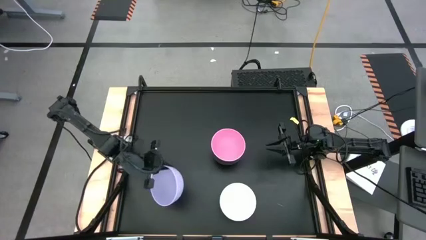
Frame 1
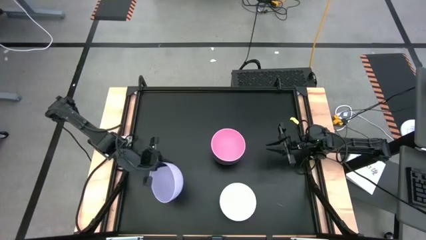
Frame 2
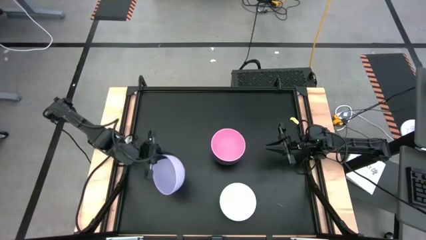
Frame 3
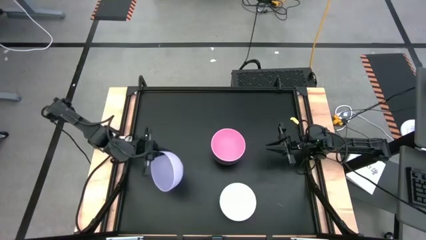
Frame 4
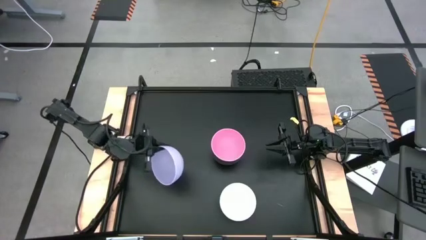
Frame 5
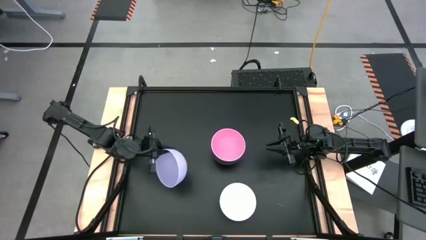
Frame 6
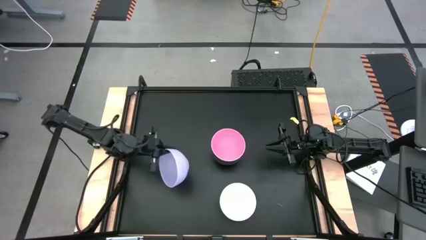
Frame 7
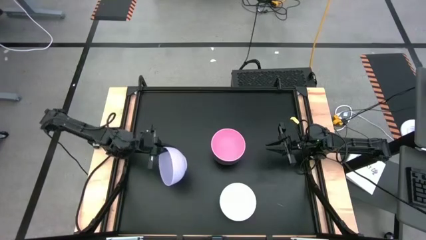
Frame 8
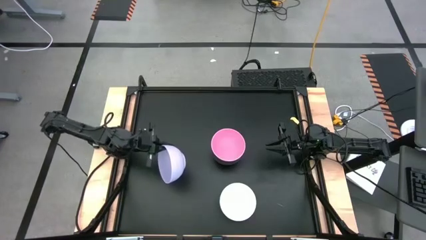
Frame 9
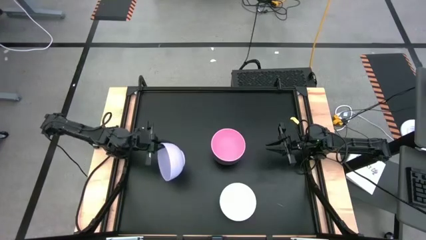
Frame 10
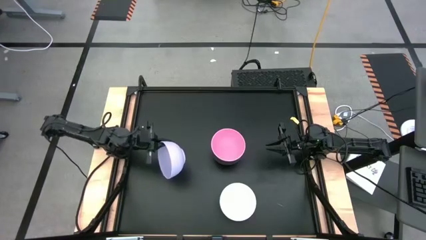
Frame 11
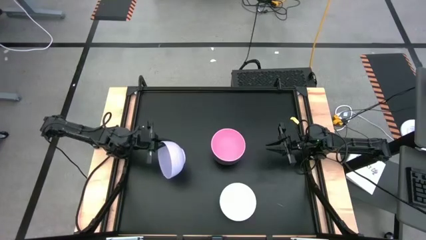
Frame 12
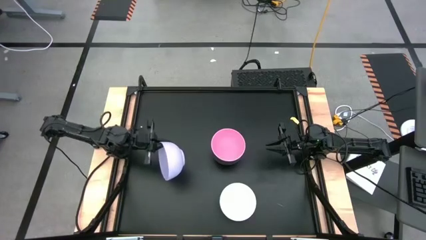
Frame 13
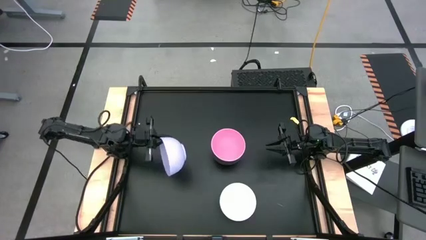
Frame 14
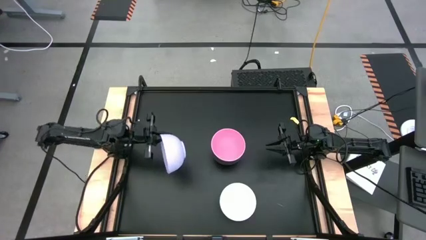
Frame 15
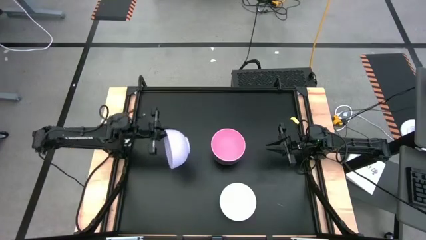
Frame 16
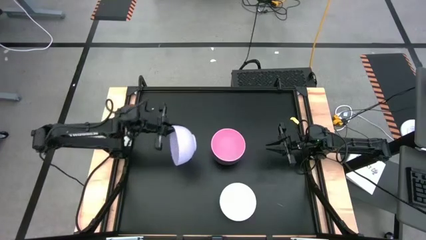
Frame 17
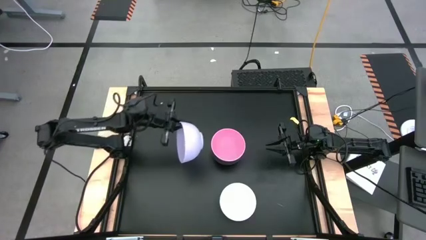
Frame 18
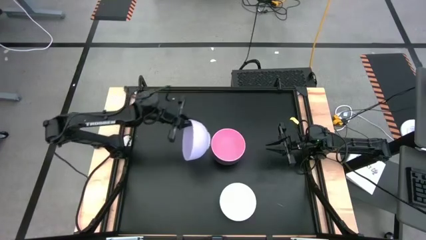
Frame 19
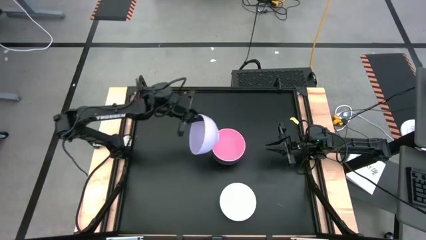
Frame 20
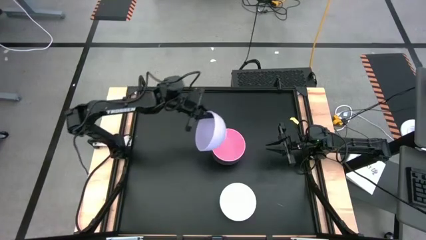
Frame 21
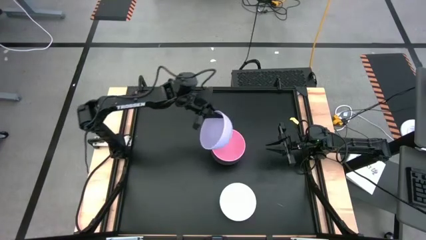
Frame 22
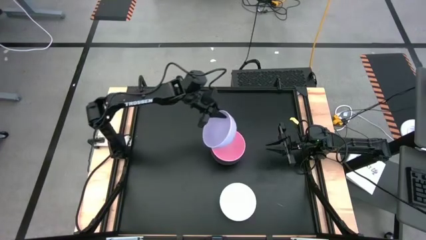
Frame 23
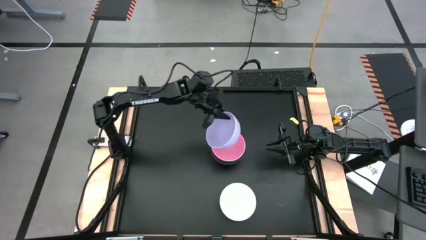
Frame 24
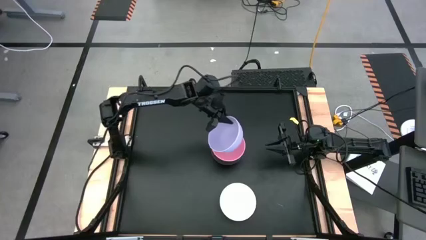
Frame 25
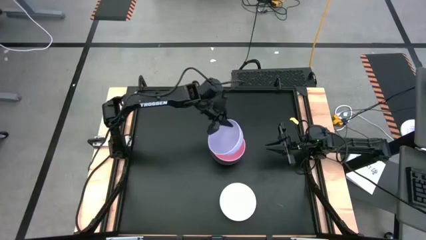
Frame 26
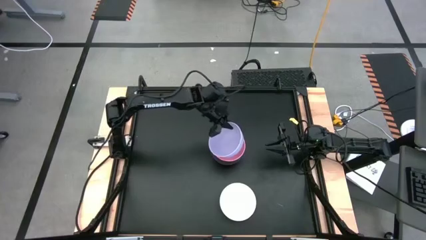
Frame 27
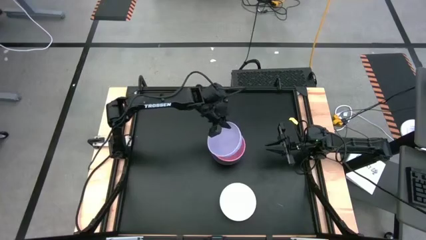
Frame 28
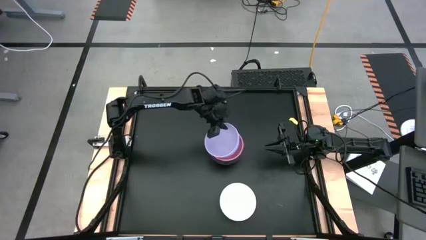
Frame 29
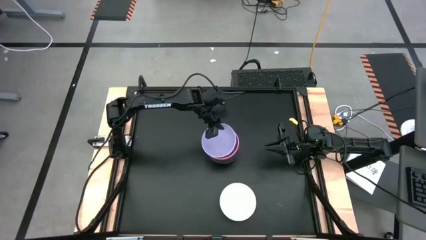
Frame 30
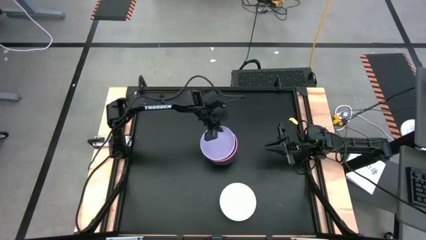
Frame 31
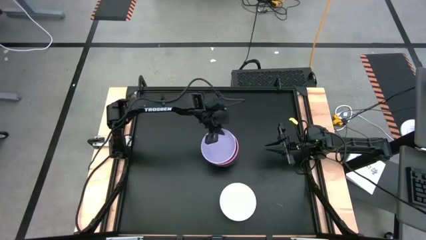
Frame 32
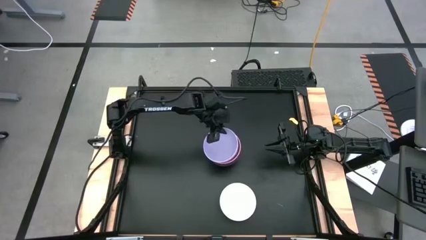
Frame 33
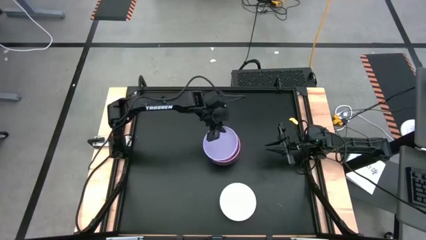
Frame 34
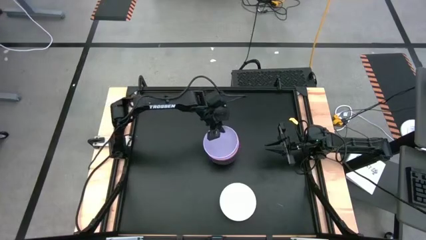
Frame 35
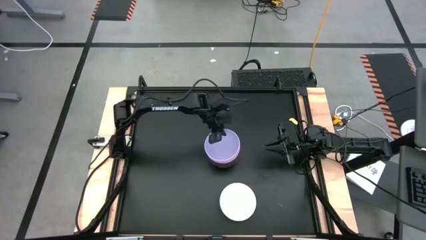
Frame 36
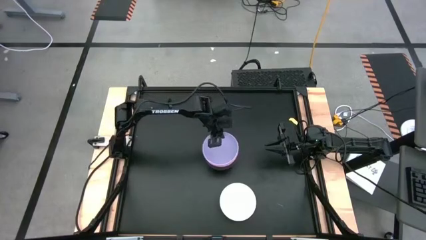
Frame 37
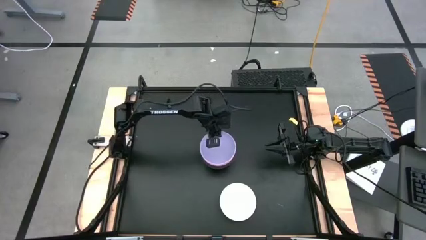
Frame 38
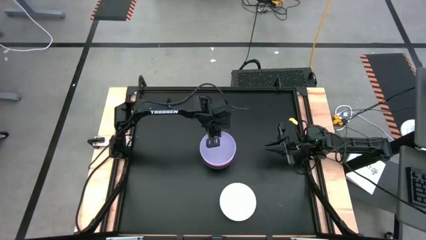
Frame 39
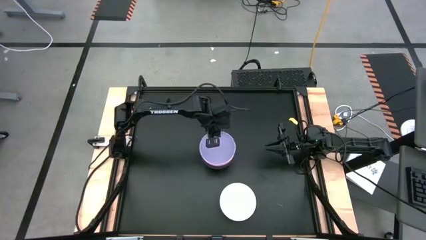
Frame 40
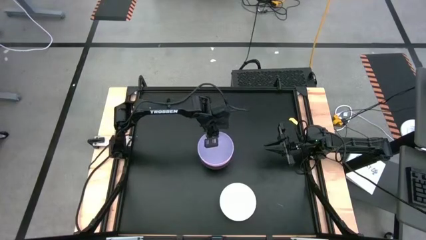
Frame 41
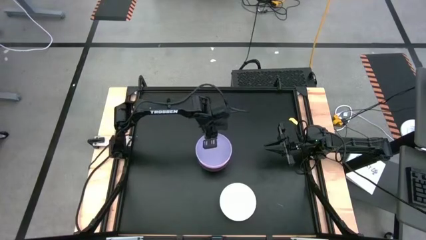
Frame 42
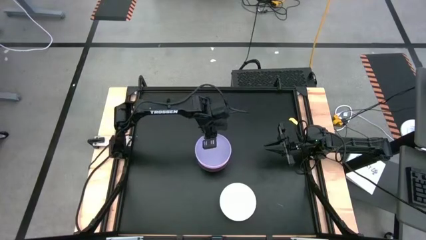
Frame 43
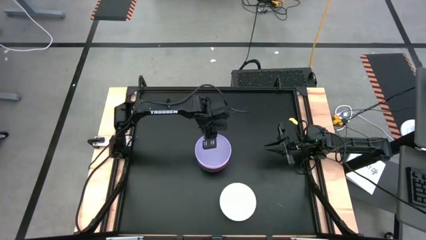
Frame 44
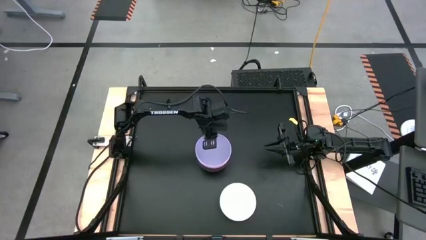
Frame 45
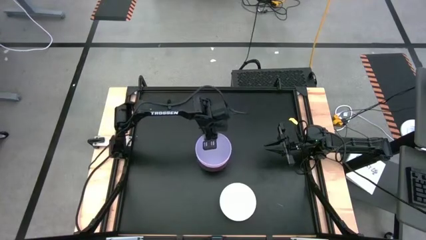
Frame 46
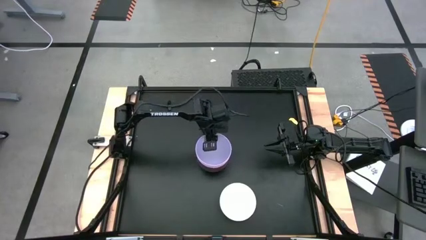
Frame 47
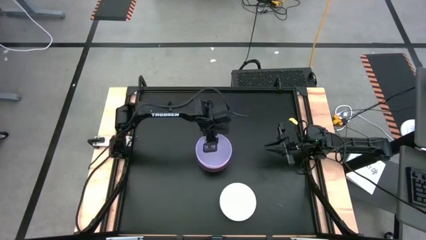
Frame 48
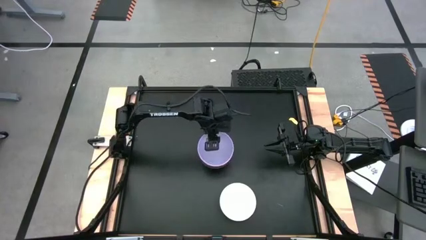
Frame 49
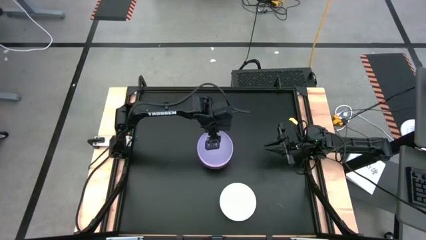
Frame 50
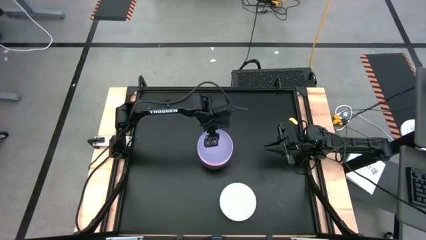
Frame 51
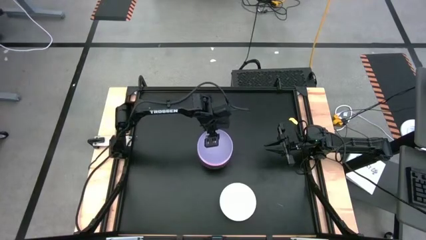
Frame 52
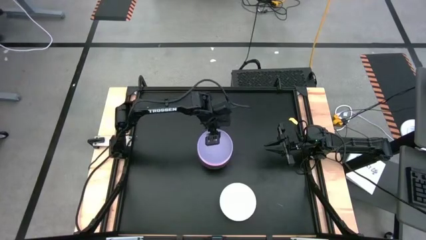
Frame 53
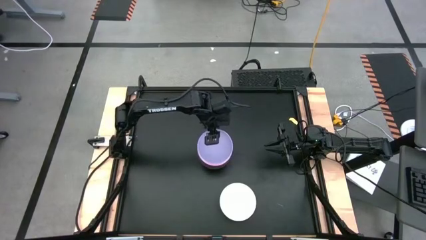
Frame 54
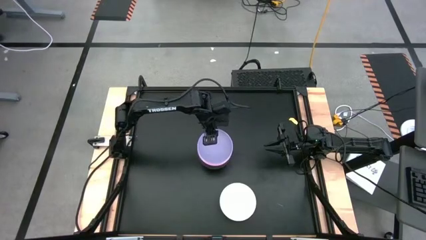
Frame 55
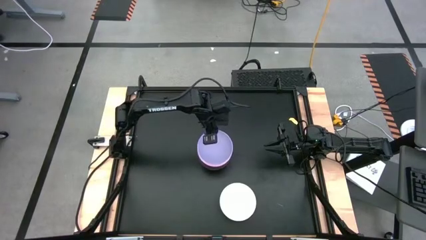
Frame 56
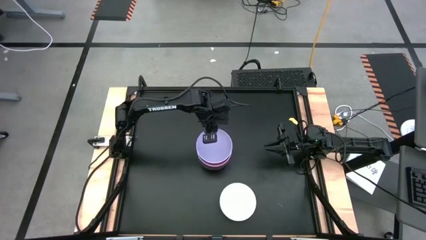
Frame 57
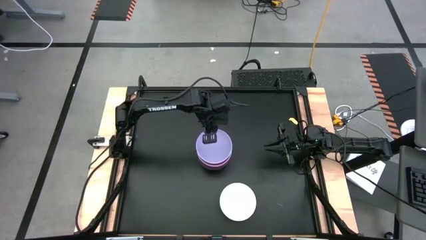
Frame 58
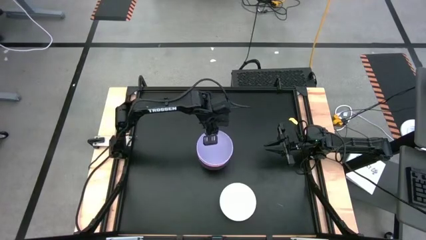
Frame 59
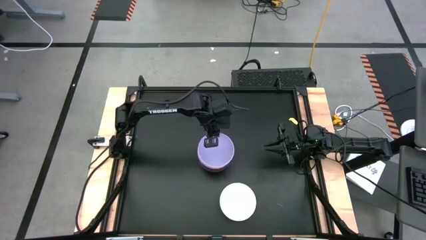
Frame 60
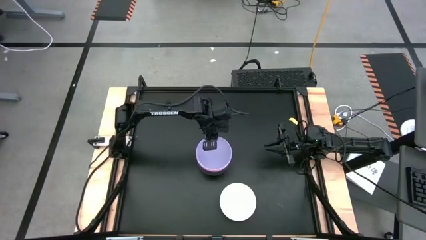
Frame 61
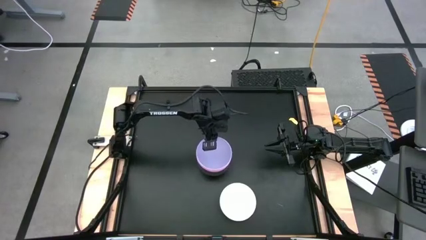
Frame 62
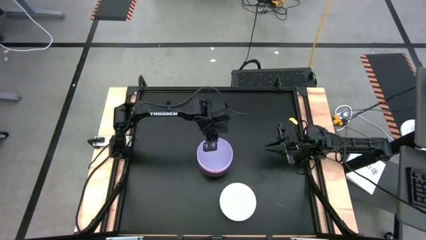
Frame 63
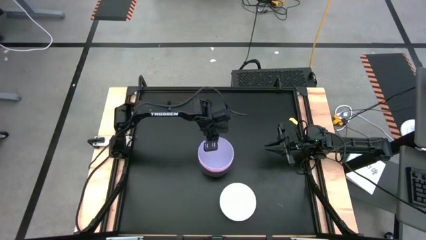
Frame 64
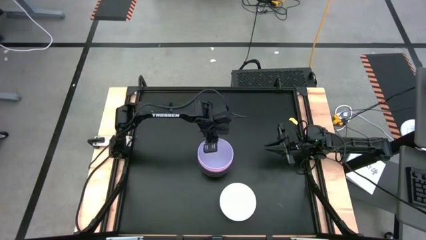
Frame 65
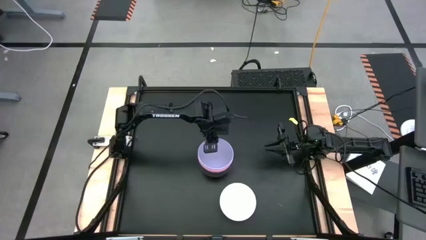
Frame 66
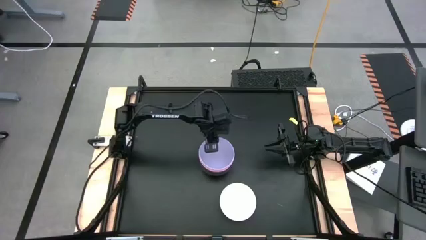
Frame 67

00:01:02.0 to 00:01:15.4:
Task: Nest bowls inside each other
Stack the purple bowl on top of the pink bowl

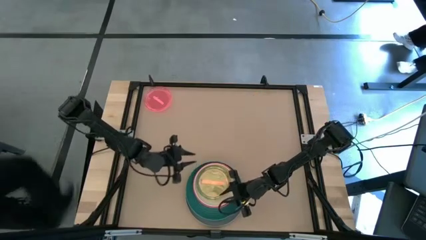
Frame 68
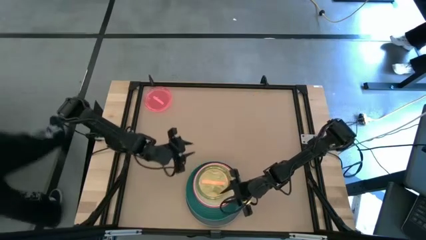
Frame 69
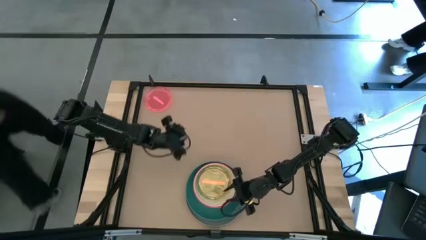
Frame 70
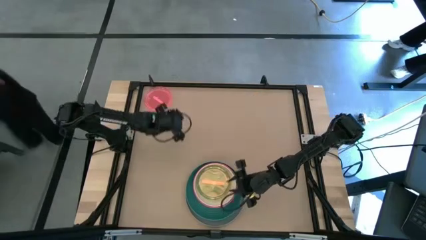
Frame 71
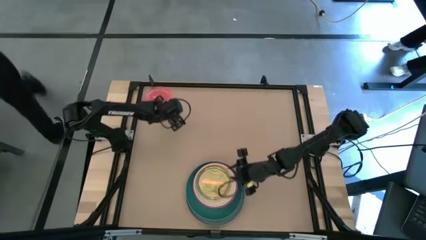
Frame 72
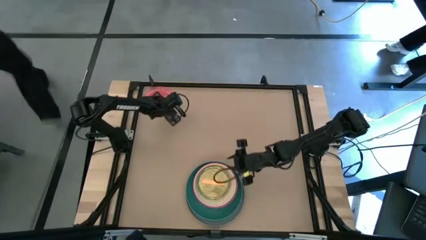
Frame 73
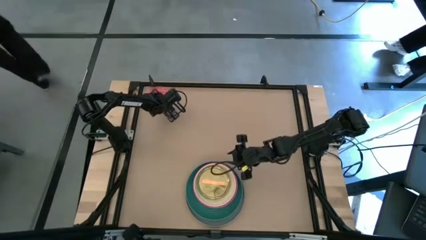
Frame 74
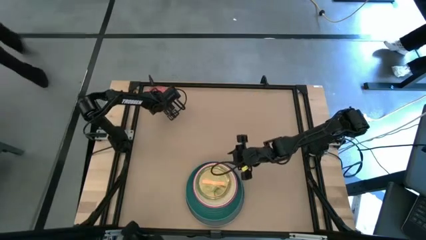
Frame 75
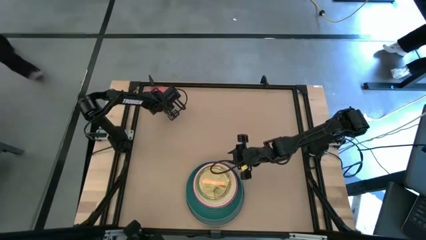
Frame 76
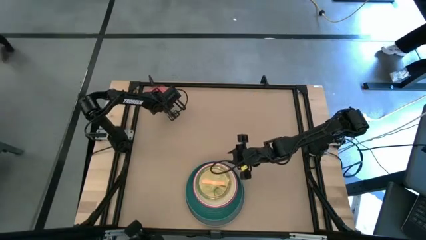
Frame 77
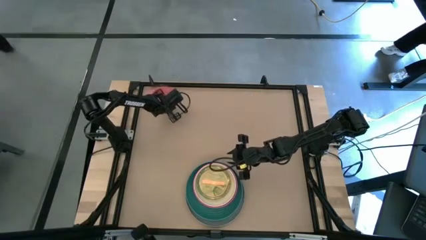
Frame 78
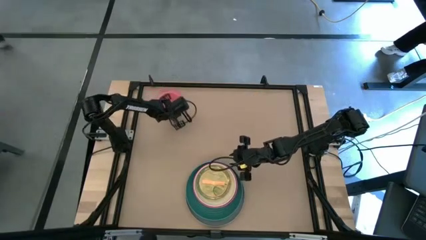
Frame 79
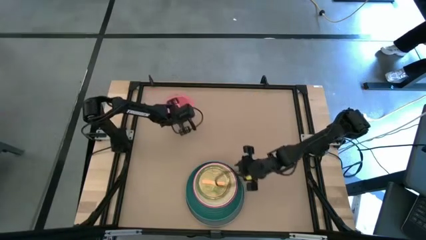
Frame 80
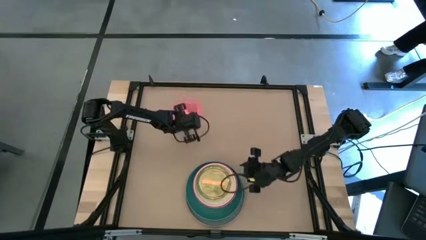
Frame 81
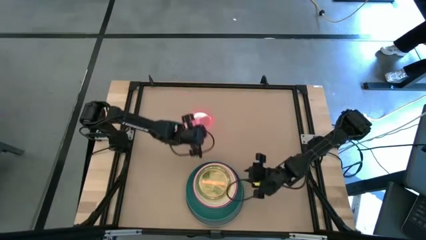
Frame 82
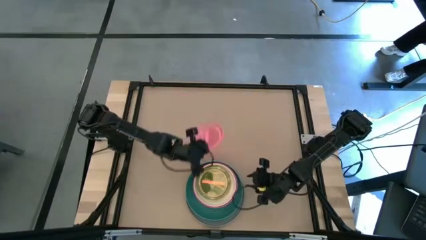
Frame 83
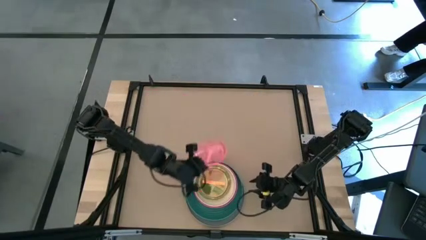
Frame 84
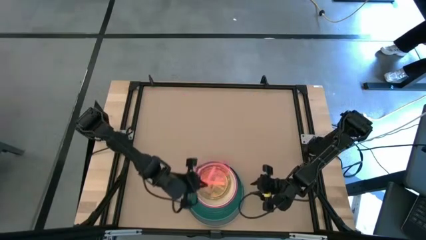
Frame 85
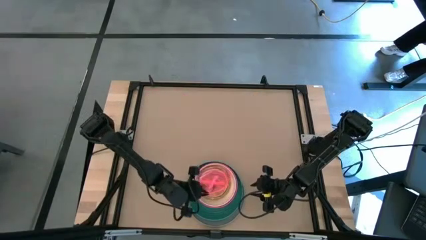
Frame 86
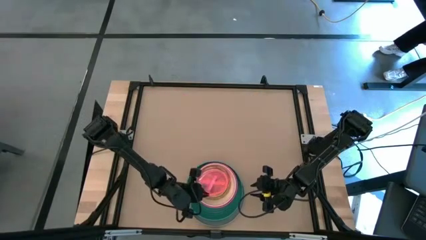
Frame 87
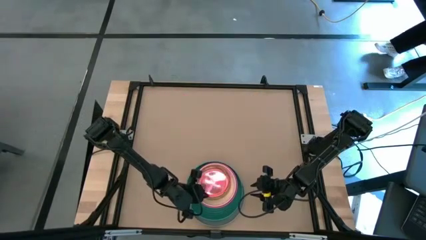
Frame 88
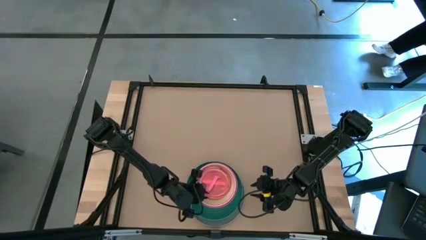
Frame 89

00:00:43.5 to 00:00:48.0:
Task: Stack plastic plates
Stack the transparent pink plate on top of the transparent orange plate
